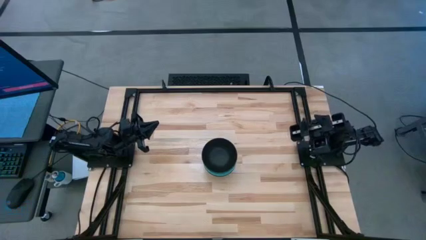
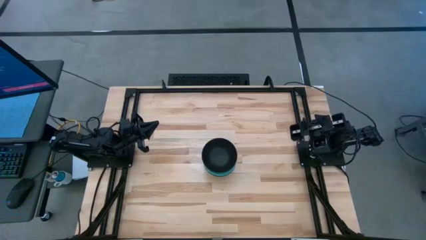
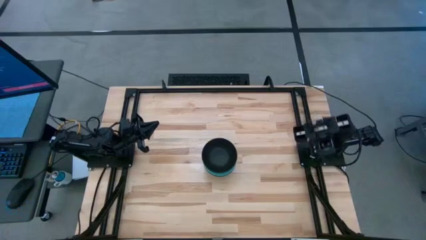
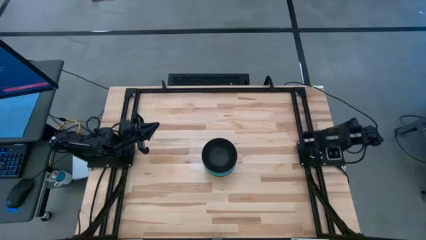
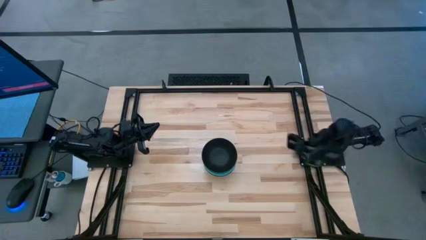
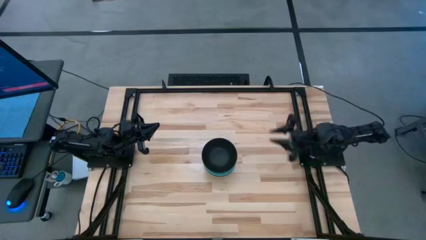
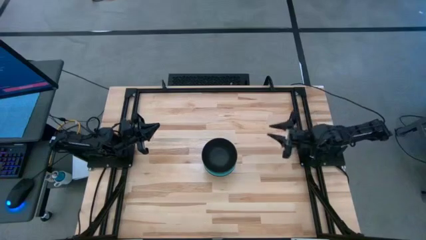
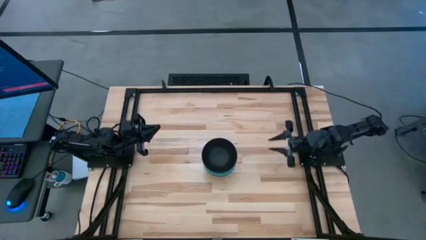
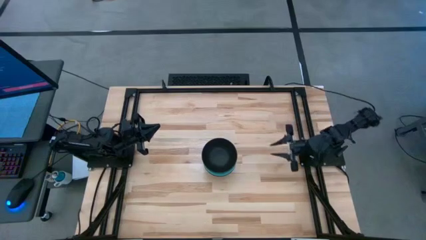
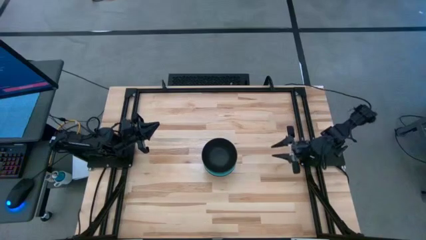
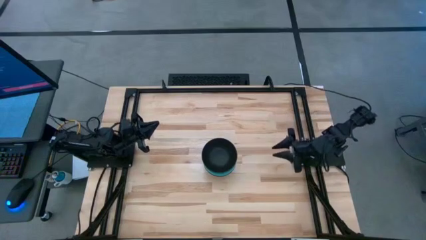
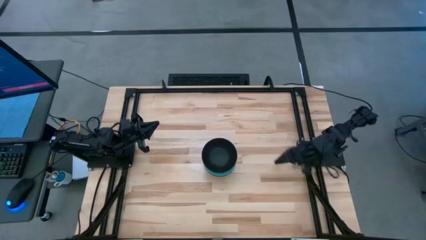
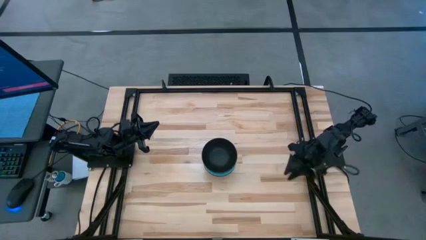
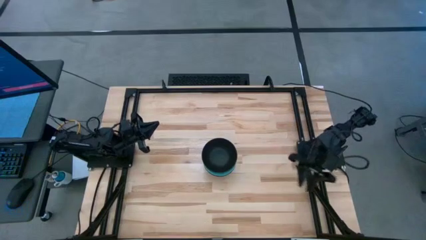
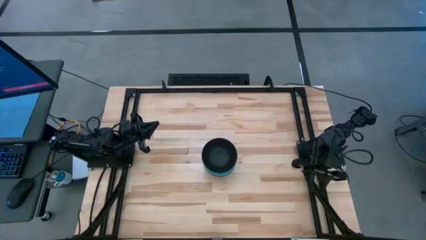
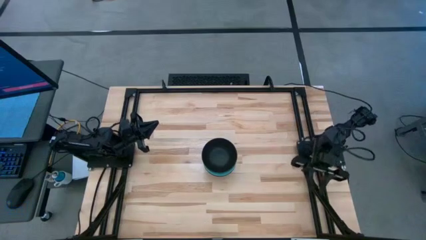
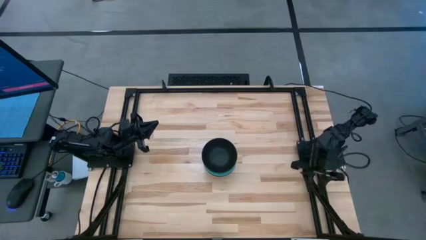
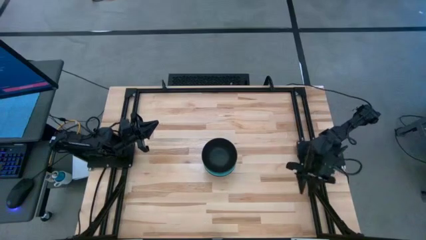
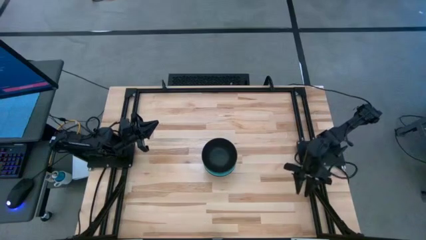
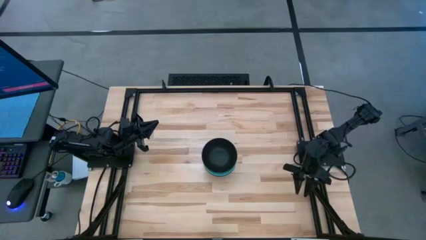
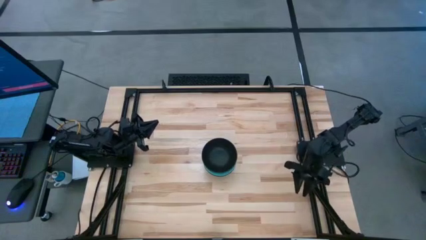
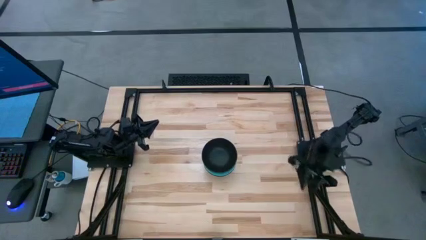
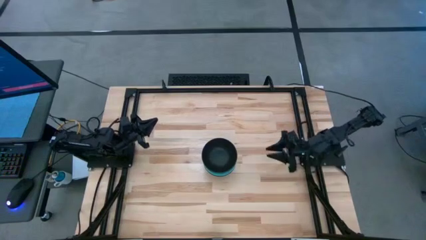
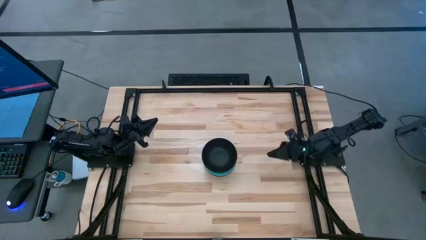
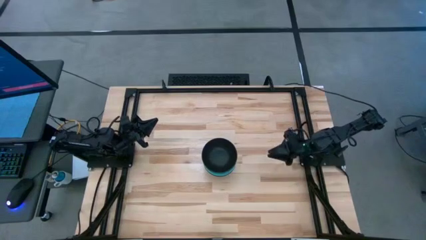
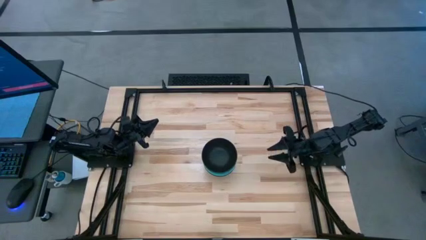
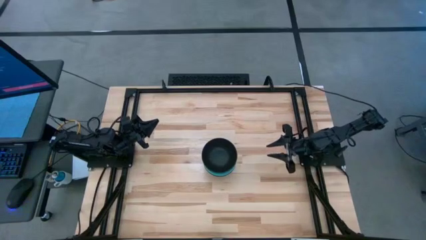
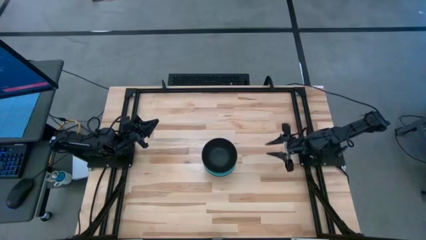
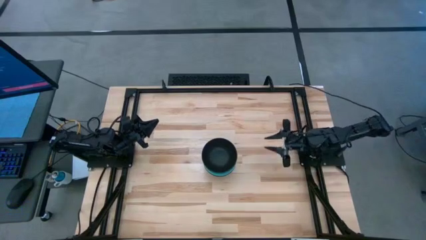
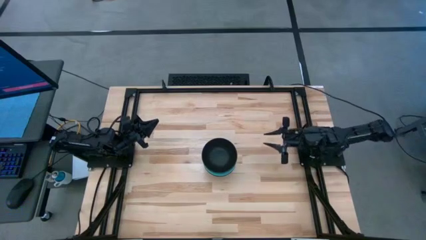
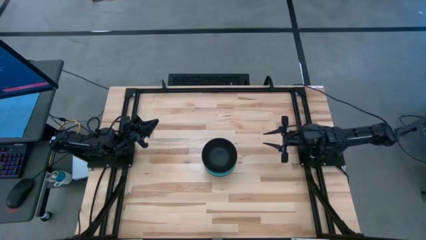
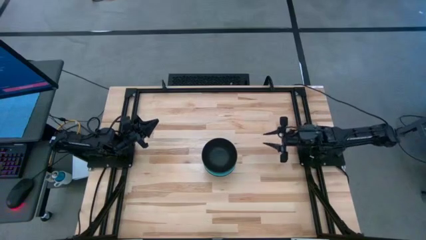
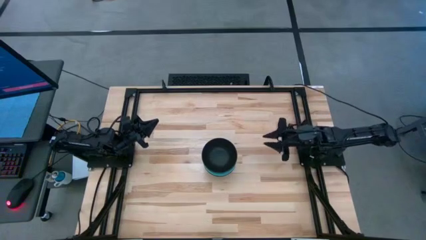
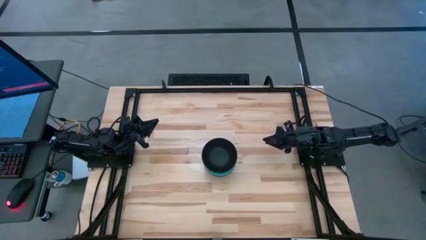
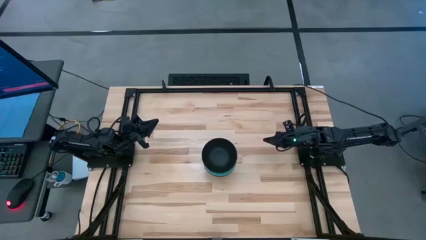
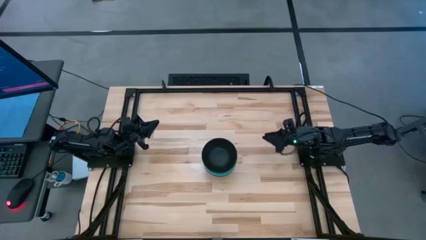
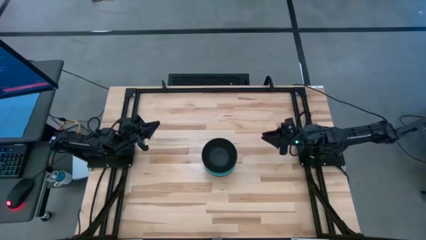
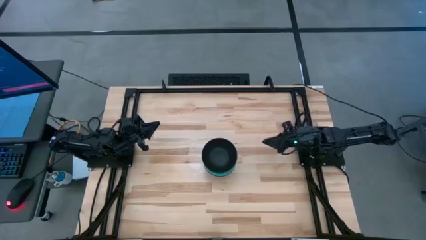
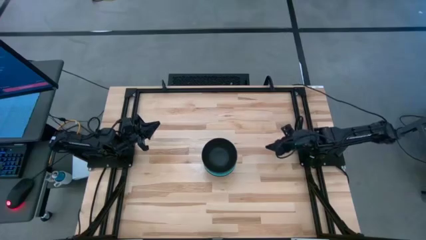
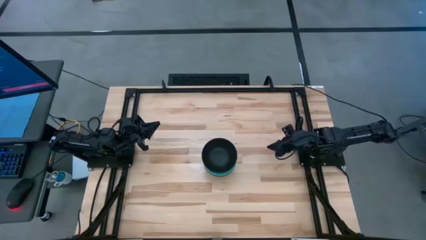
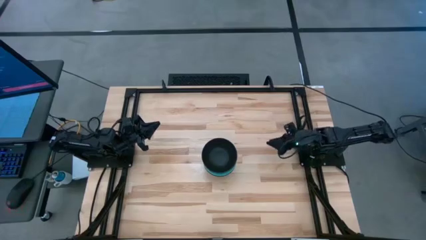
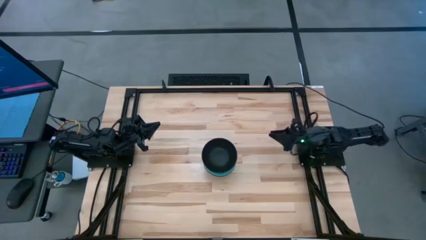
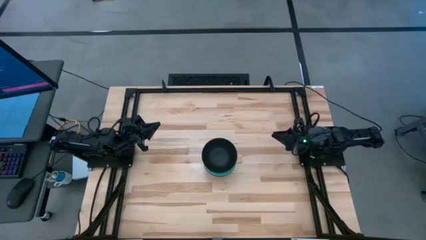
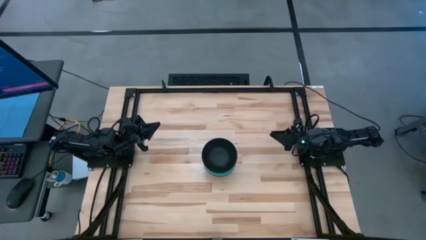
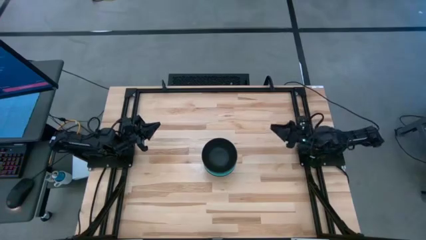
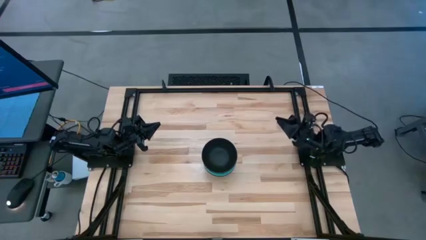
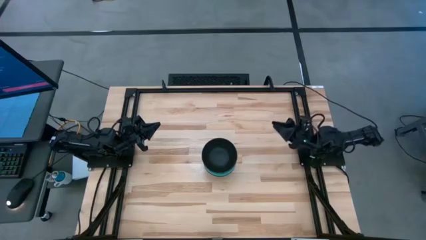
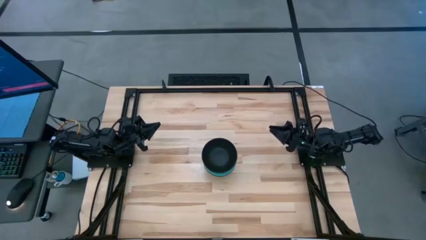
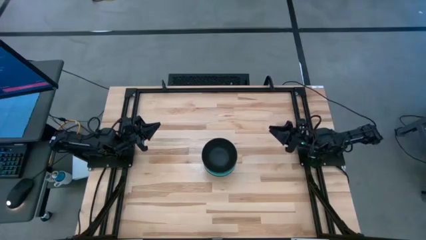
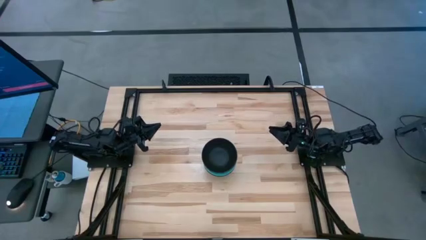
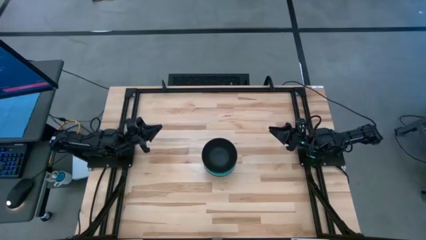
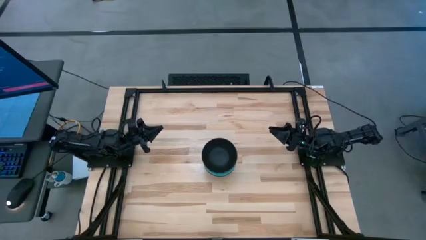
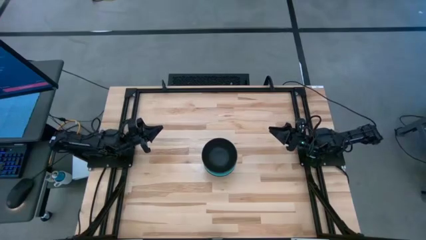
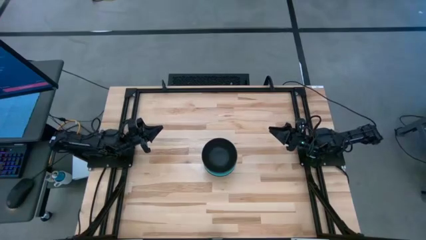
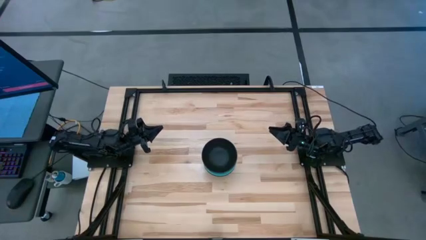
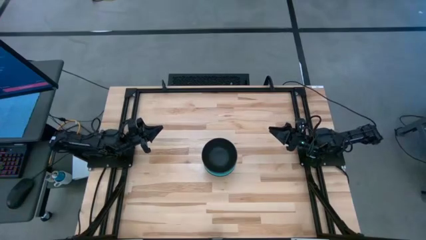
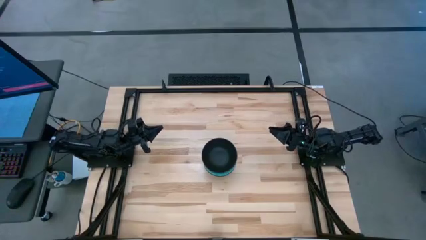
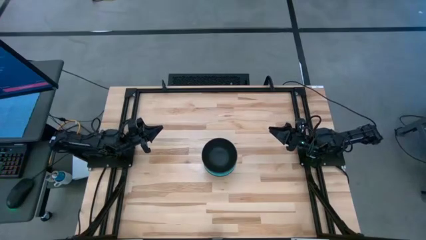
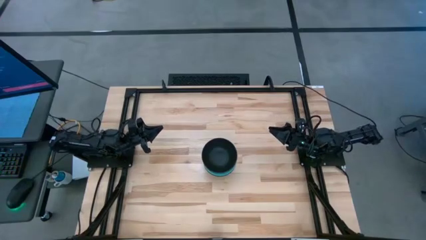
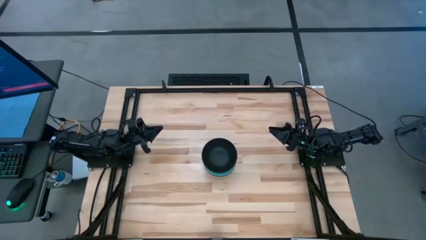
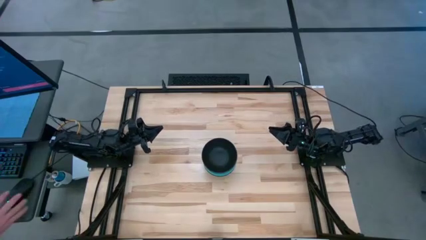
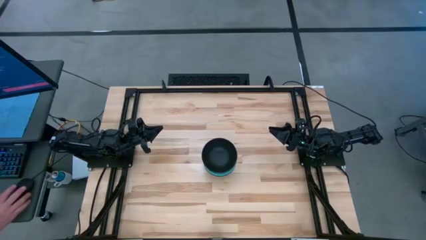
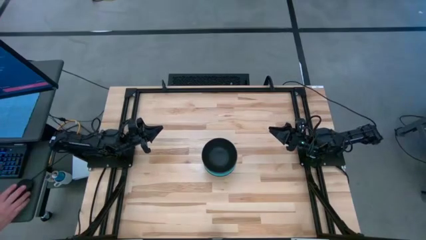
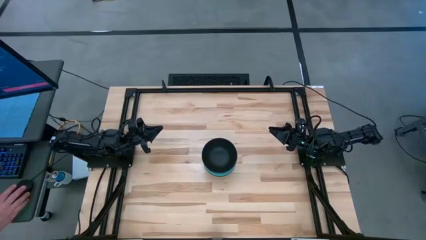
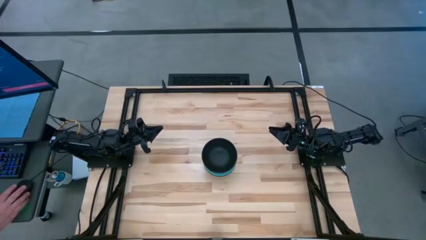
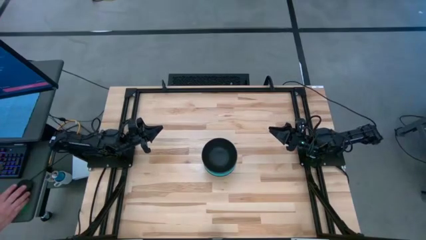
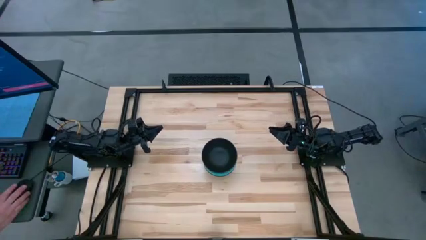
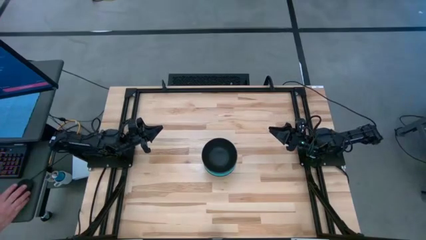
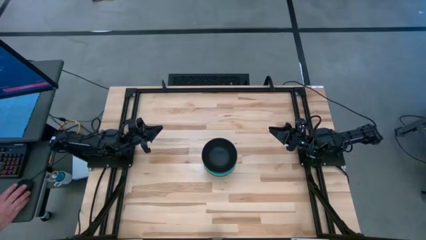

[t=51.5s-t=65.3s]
Task: Nest bowls inside each other
Return to Home Position

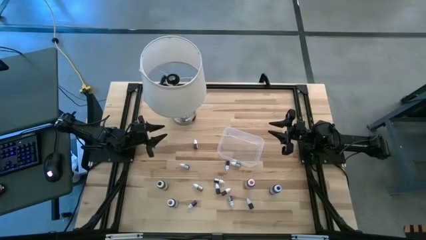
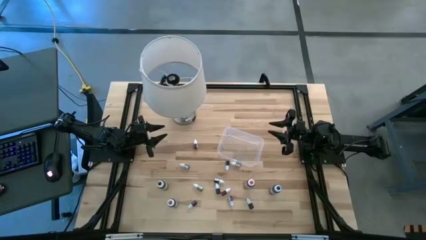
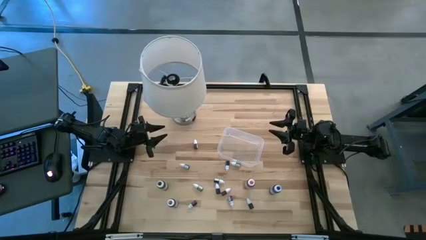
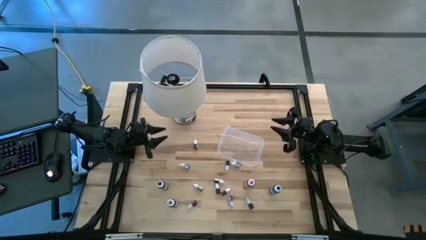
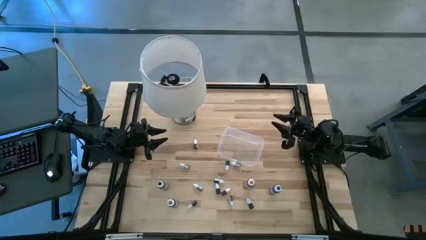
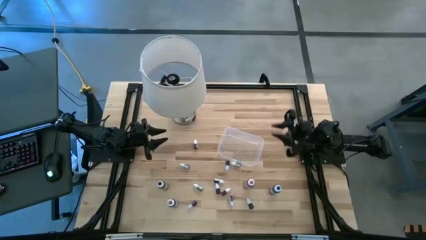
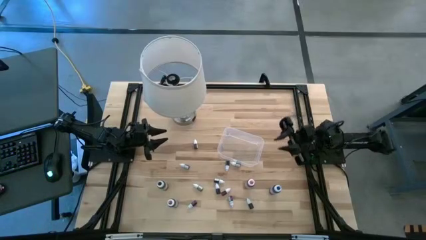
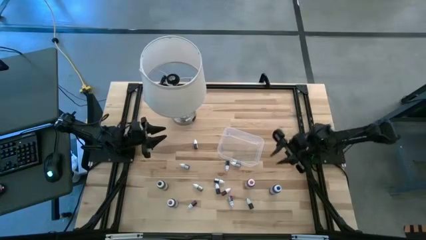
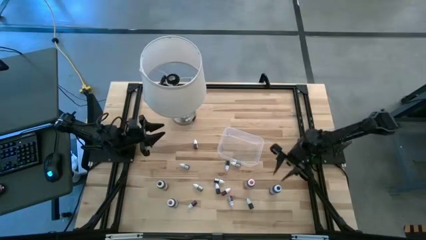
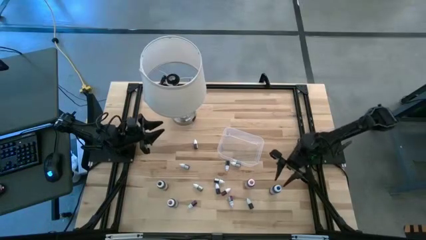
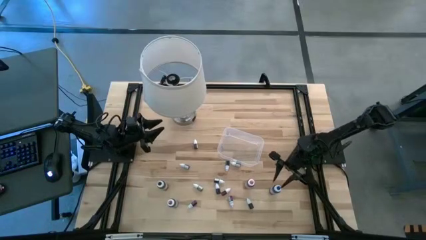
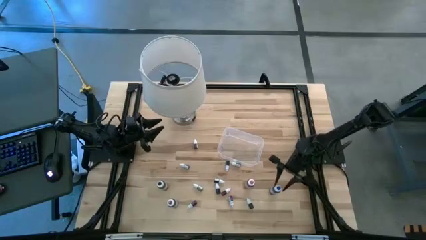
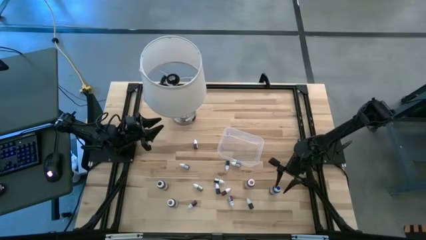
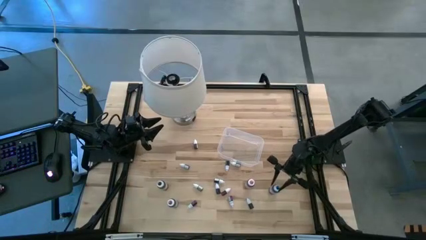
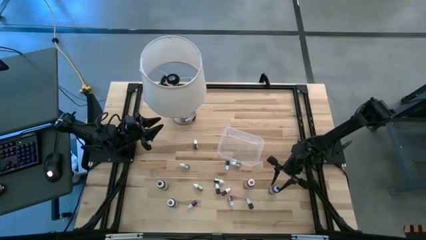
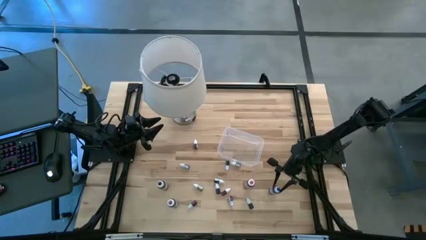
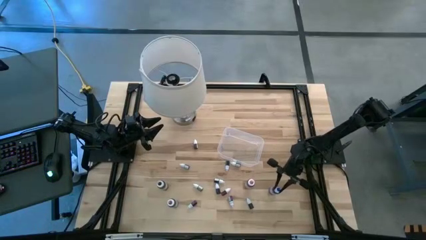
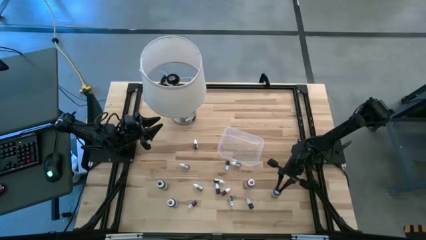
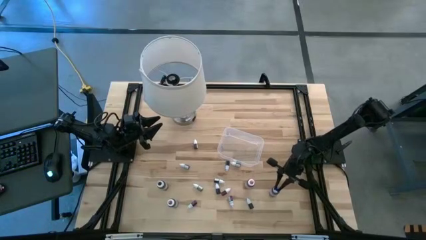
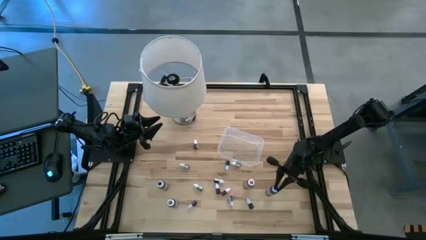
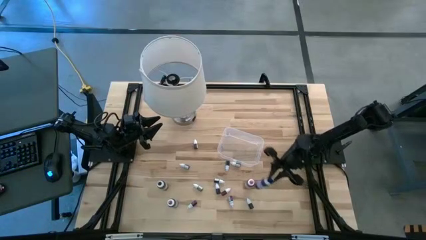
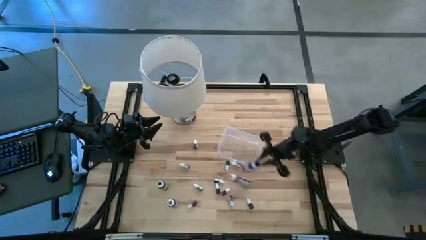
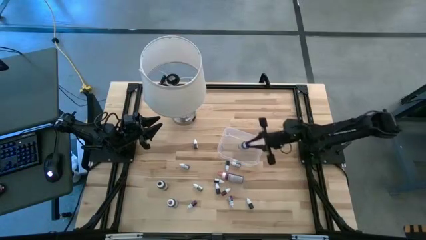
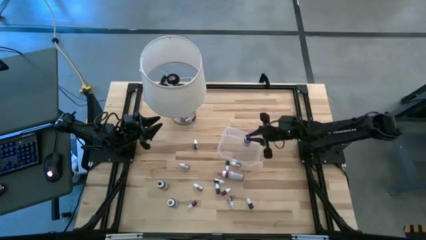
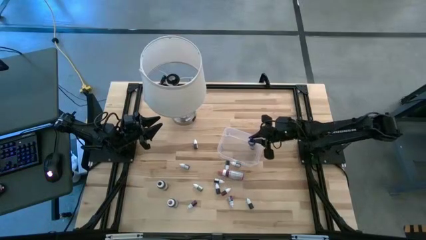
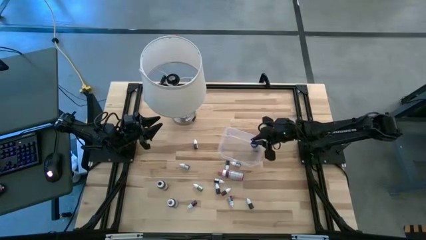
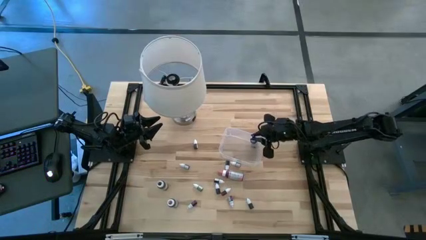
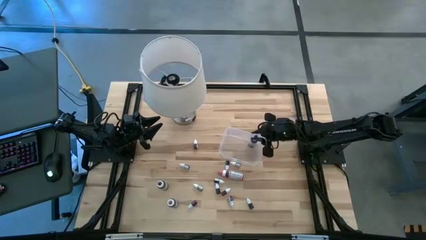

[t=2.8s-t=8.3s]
Task: Pick & Place food coloring
Put the large blue food coloring bottle into the transparent bin
